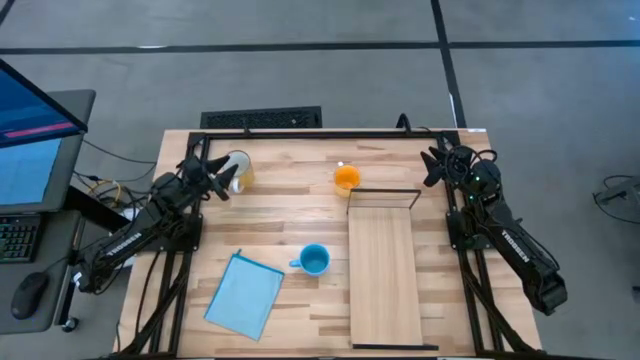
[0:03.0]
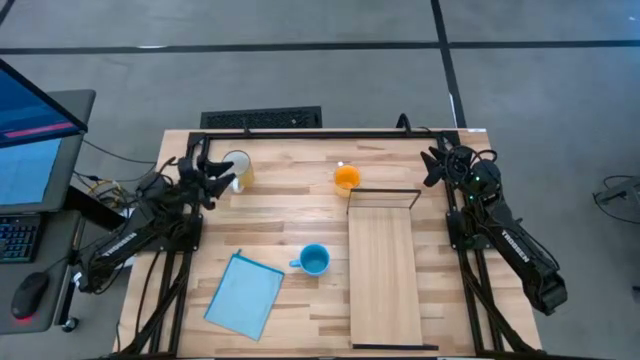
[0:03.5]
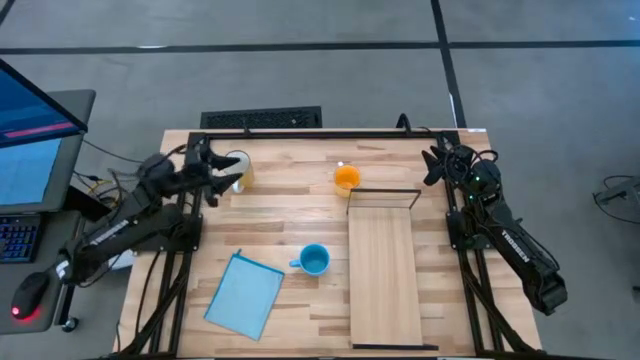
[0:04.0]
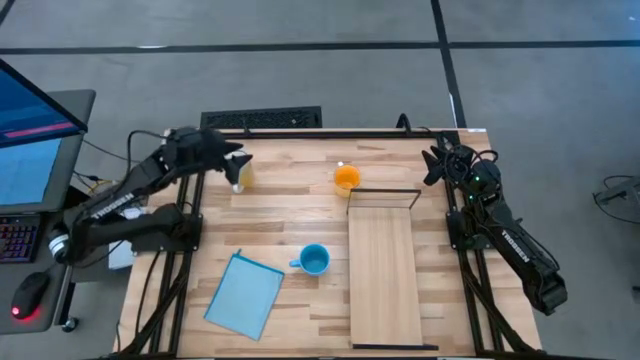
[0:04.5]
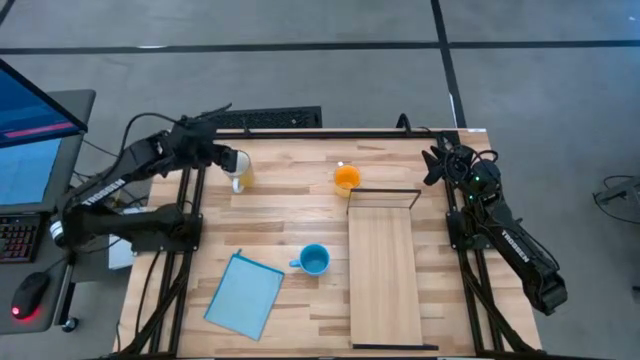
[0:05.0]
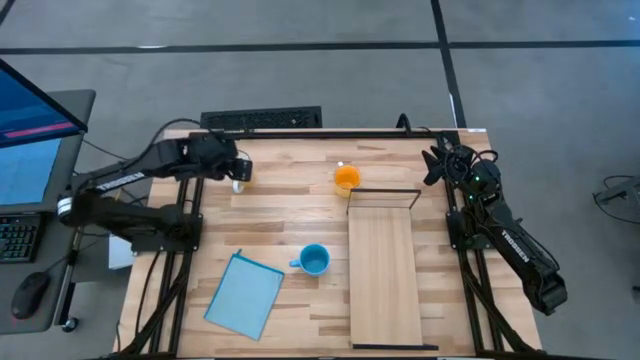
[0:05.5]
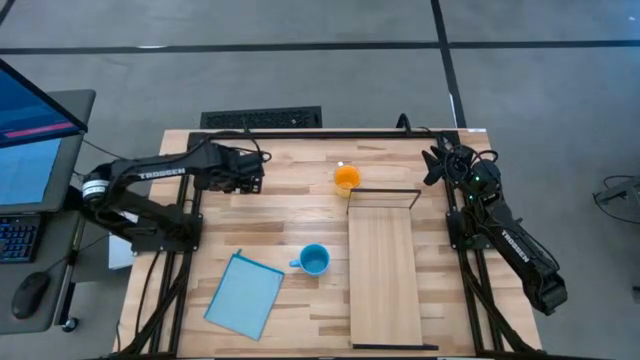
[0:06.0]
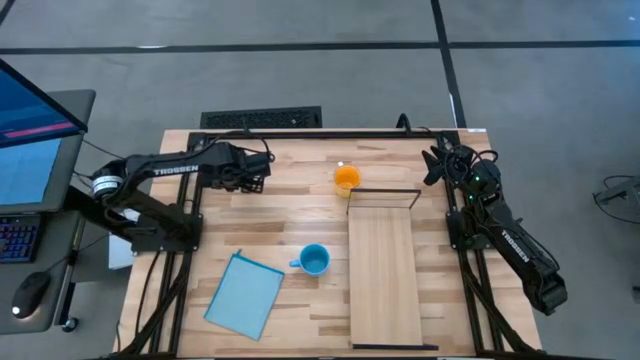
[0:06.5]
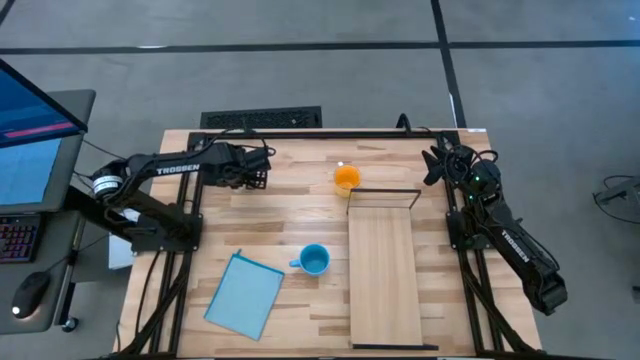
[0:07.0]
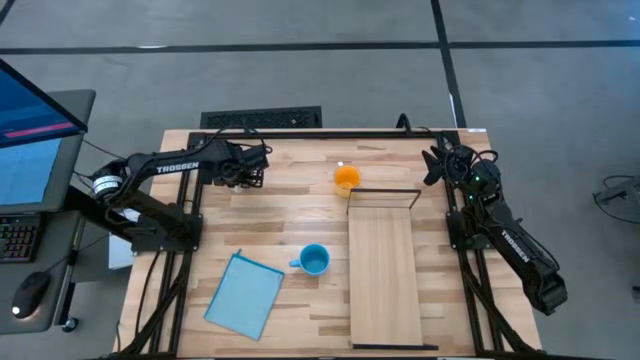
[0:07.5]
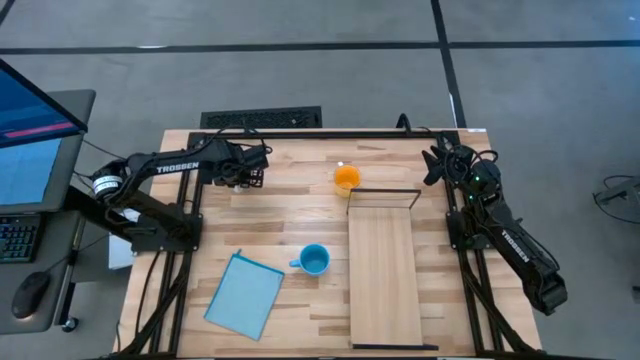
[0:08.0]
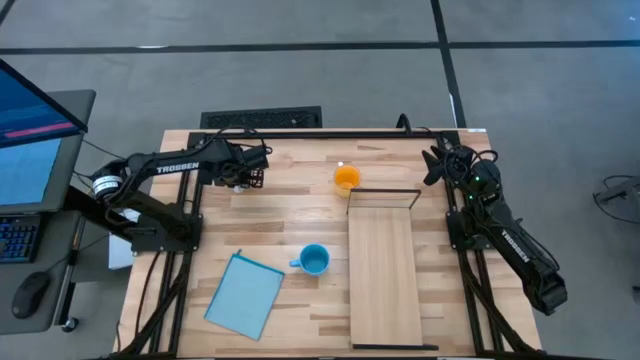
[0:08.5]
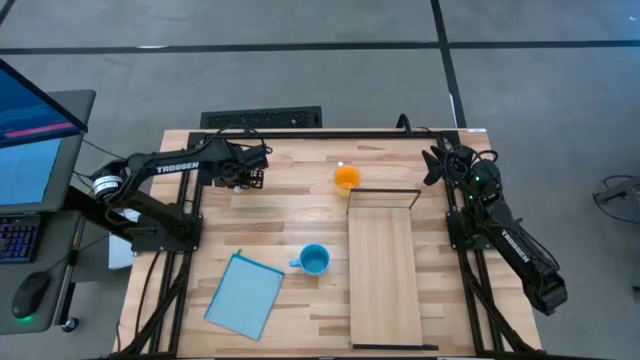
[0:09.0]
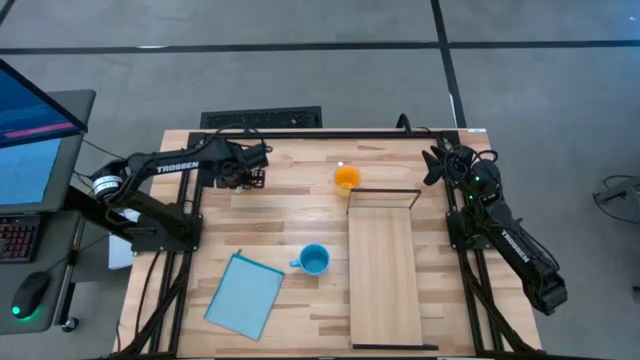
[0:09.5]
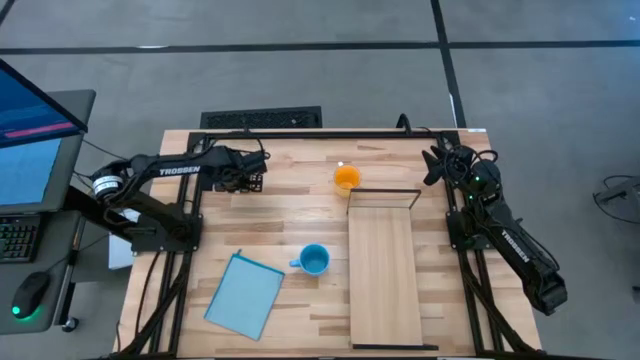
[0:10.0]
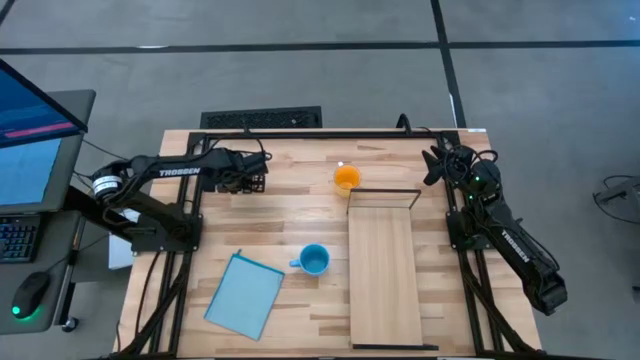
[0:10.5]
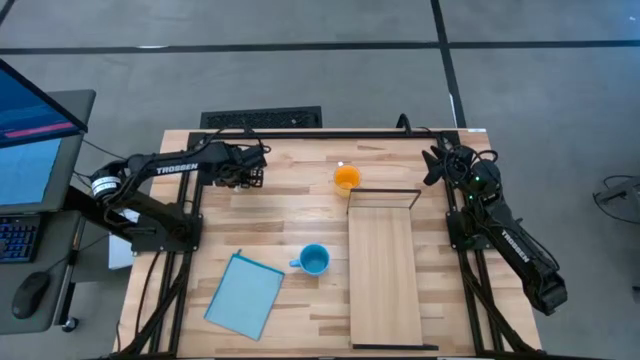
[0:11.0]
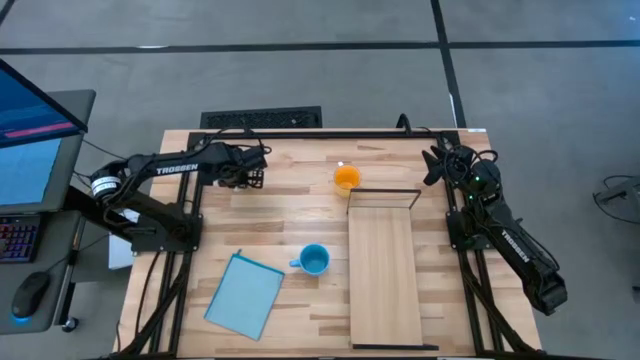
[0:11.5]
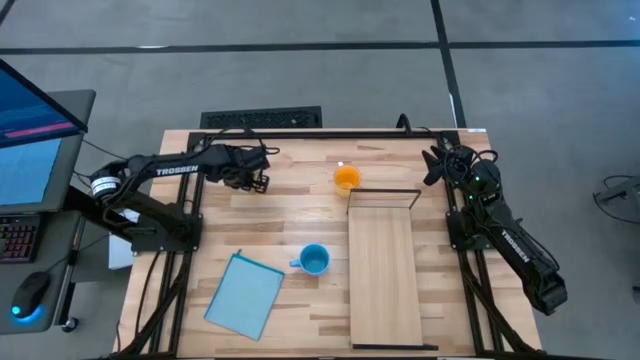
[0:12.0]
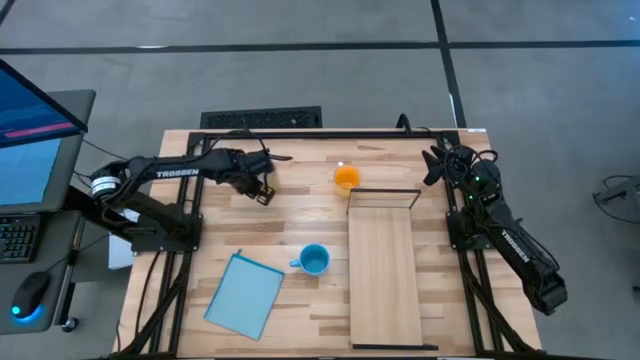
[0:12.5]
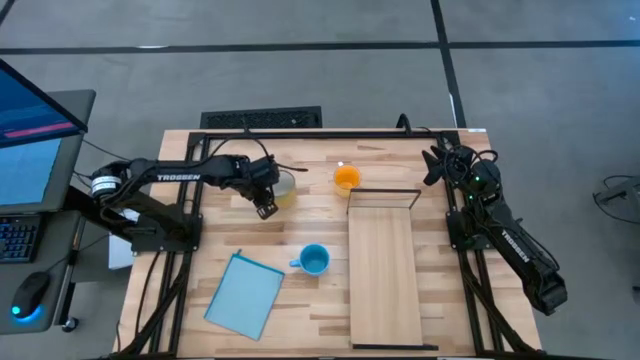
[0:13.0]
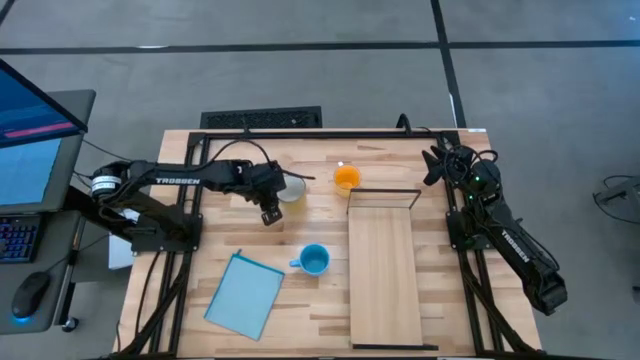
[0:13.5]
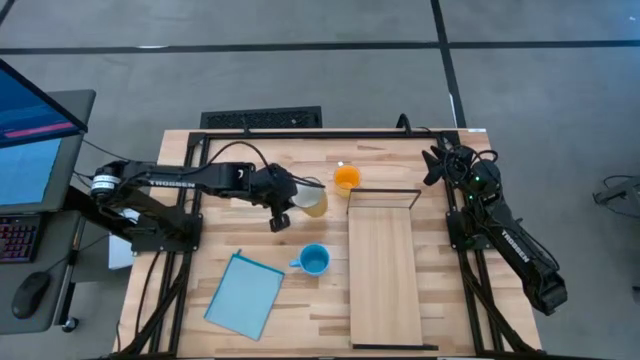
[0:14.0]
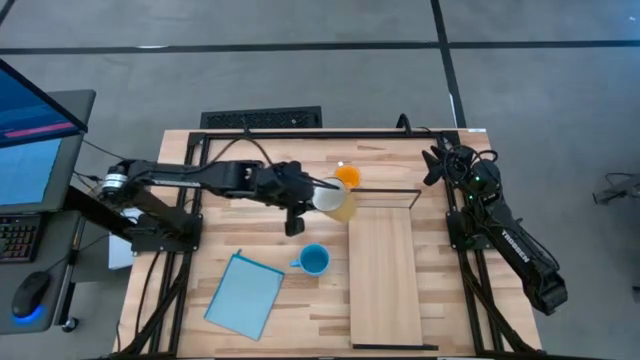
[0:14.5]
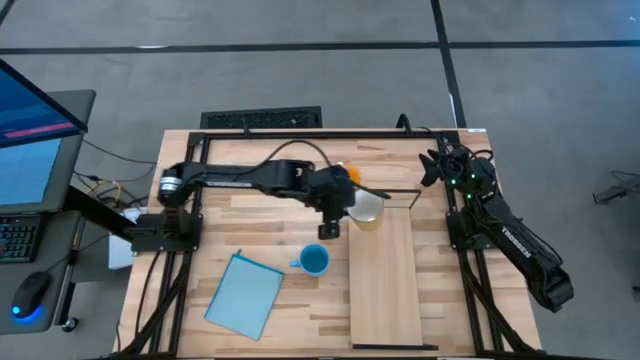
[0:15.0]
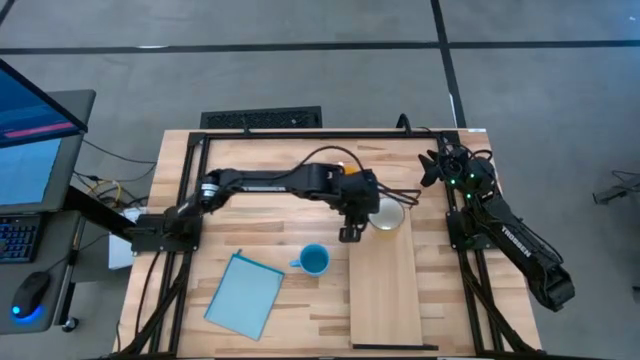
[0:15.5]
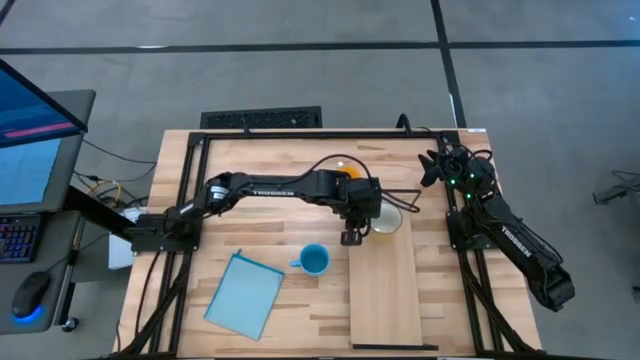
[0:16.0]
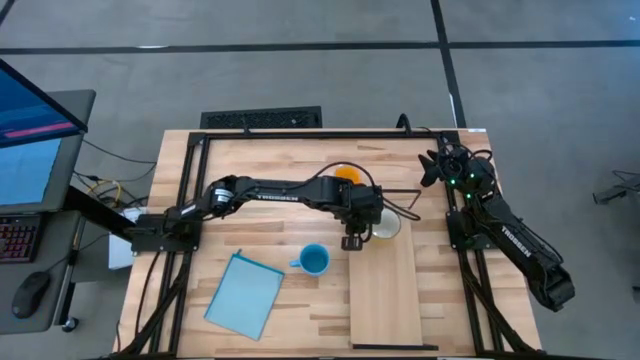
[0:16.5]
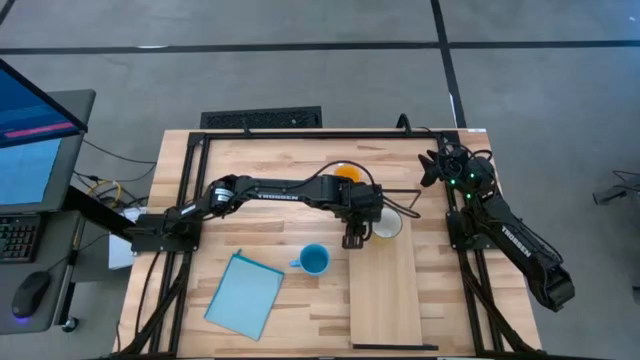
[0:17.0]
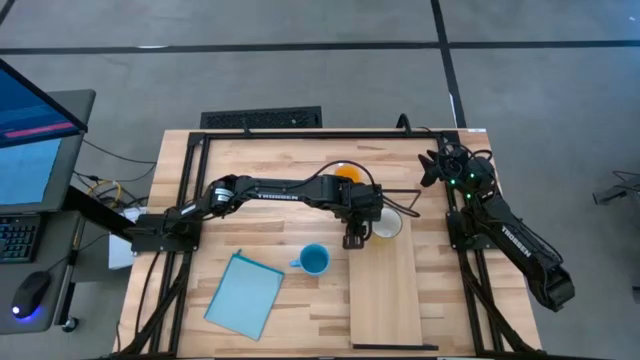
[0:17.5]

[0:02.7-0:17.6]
Task: Stack small to large cups/mugs on shelf
Put the white cup on the shelf

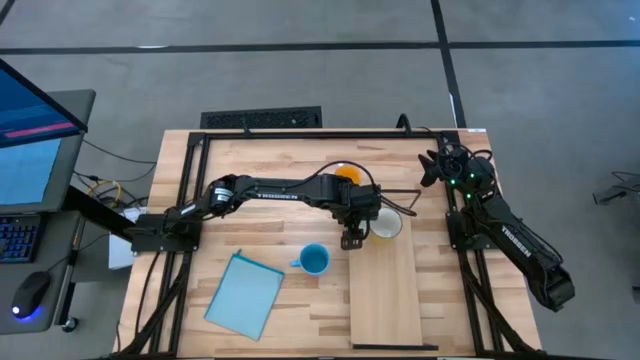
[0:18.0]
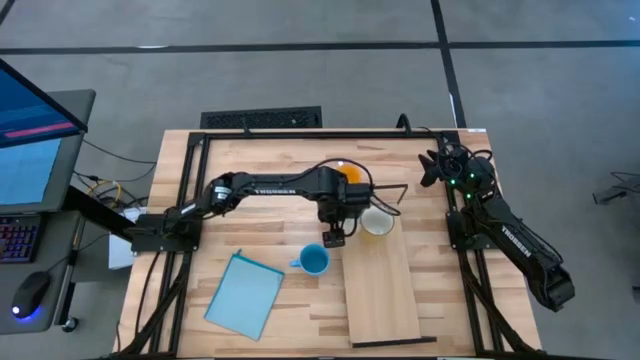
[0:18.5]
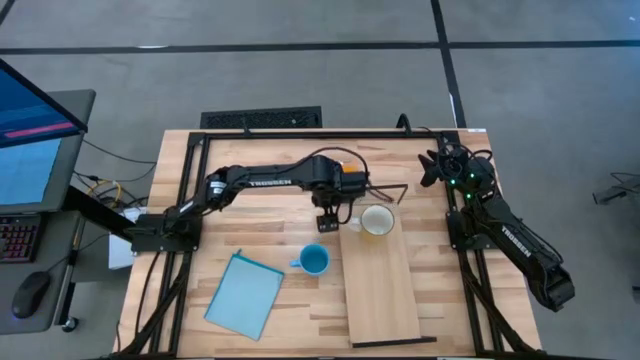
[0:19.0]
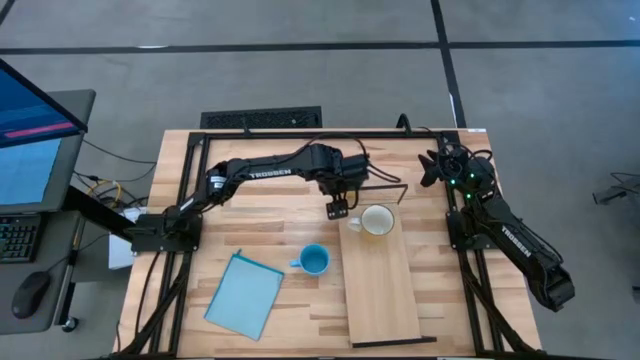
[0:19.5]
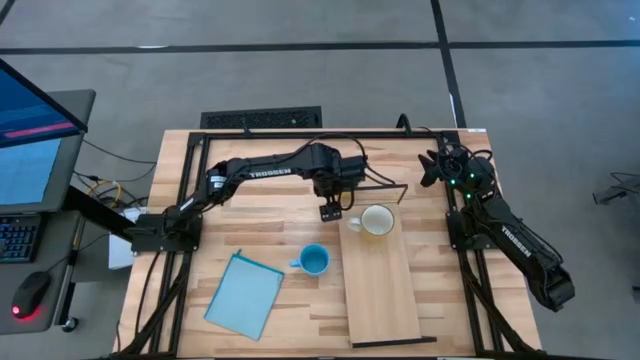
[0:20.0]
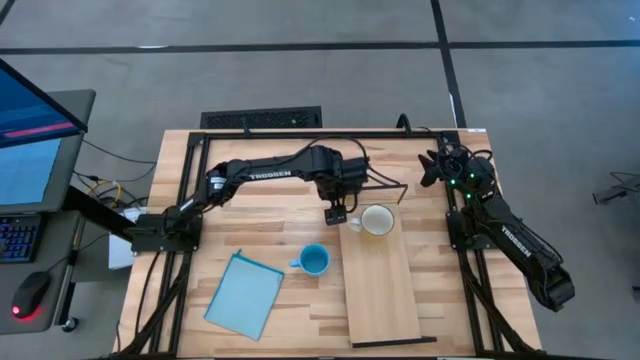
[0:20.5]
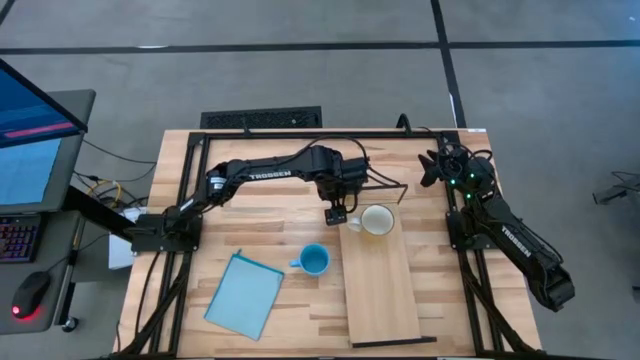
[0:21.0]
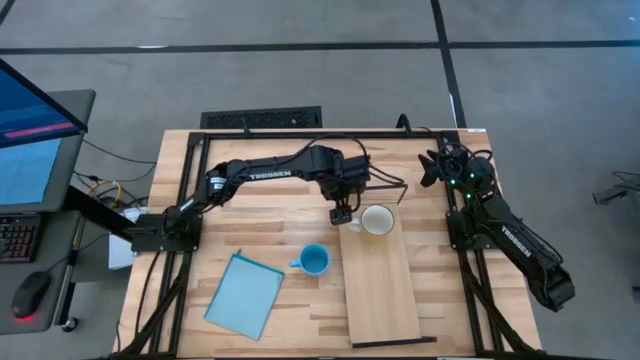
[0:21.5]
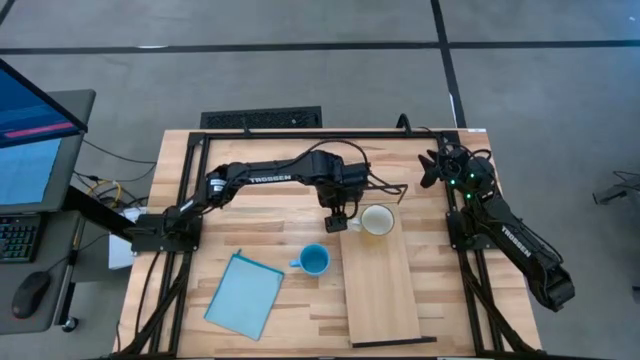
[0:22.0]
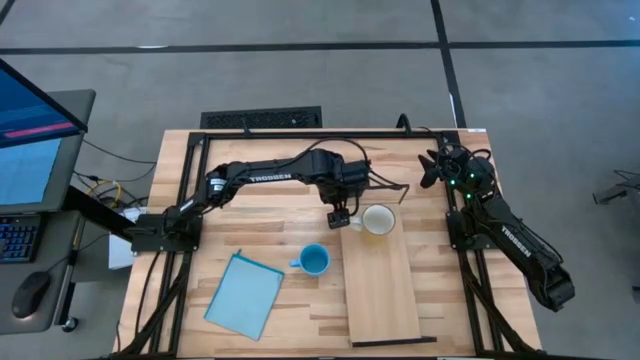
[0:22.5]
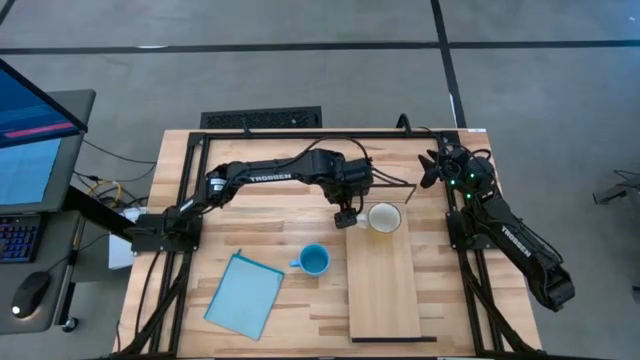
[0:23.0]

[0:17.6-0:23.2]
Adjust the shelf on the table
